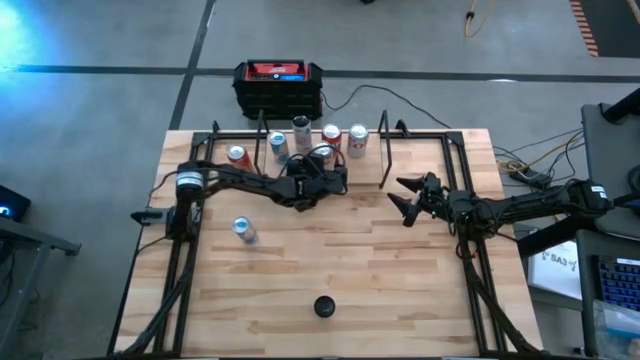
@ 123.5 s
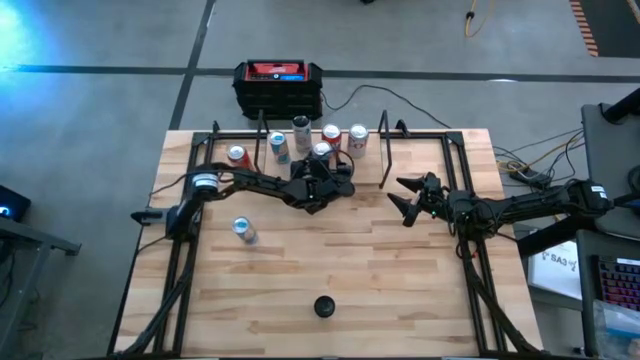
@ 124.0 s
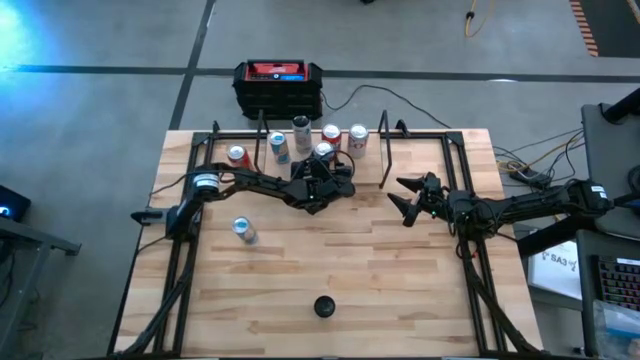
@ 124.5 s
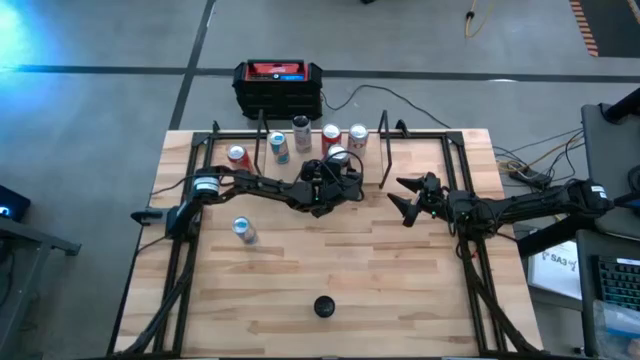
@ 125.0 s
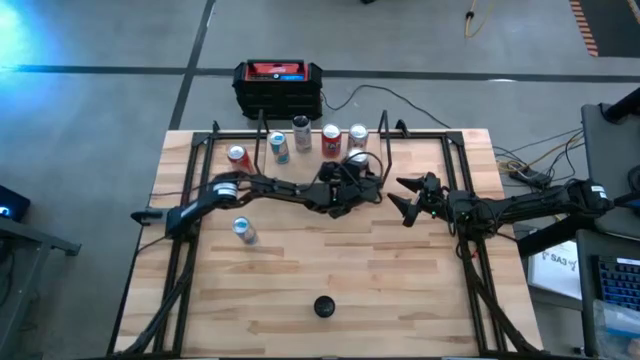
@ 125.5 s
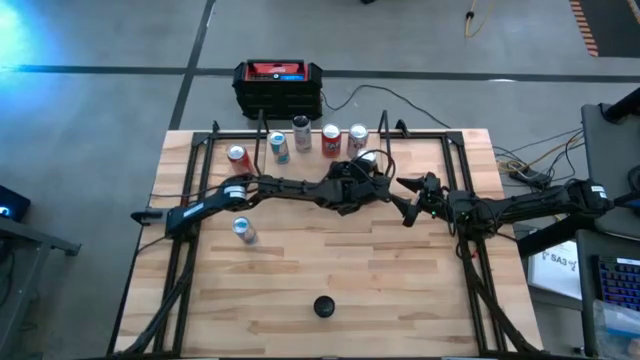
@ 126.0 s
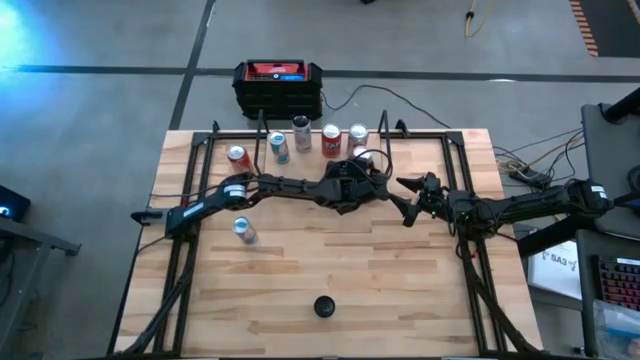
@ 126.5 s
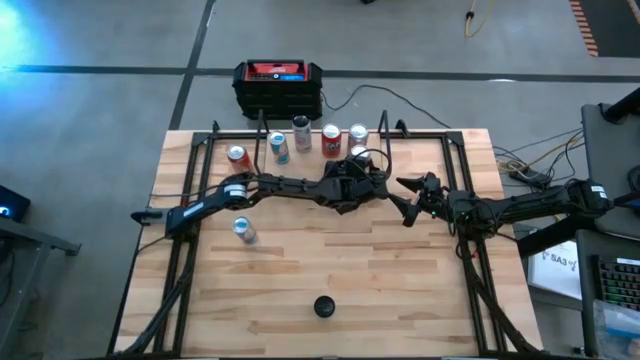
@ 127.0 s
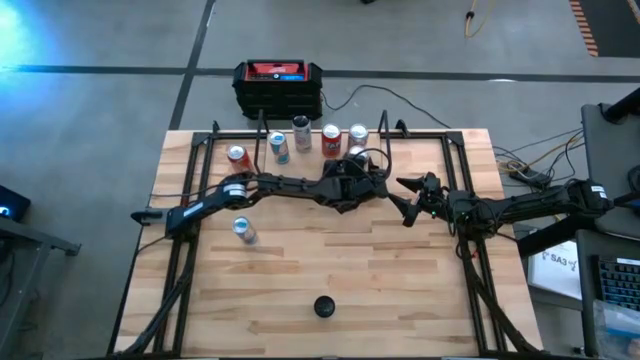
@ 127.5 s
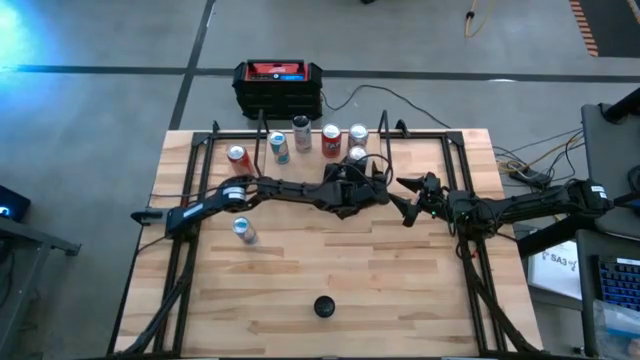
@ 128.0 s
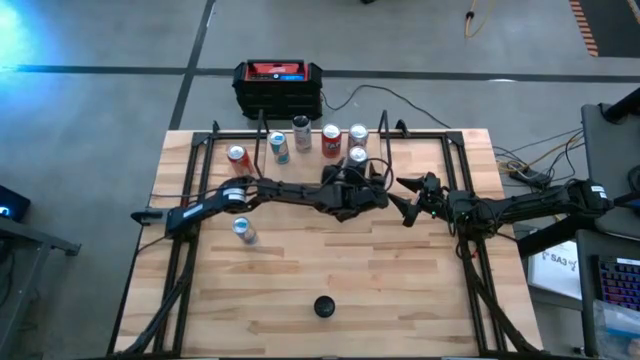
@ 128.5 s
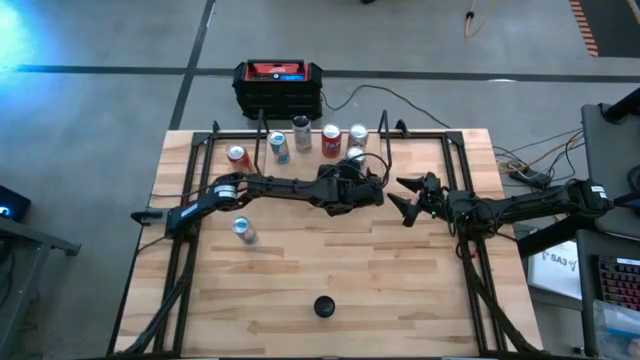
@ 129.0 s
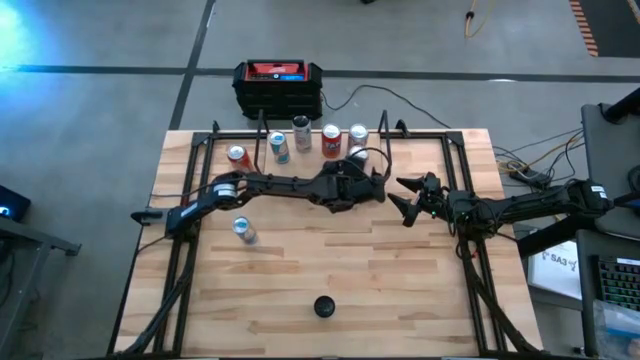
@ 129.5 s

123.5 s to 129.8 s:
Task: Place canned beverage on shelf
Put the red and silver soda can on the shelf aligned with the other red and silver soda can

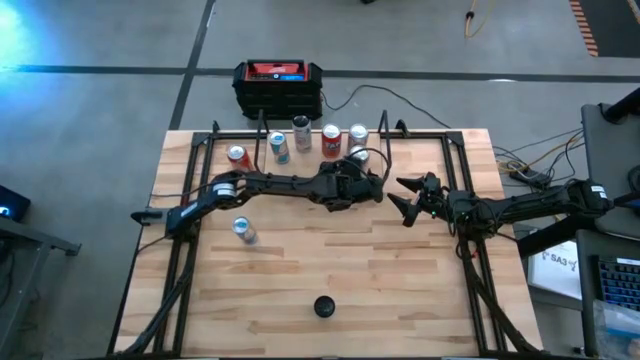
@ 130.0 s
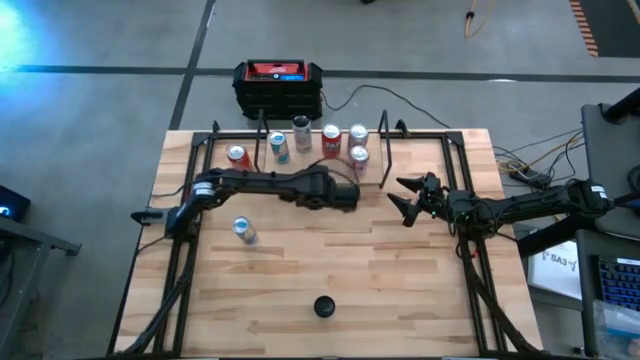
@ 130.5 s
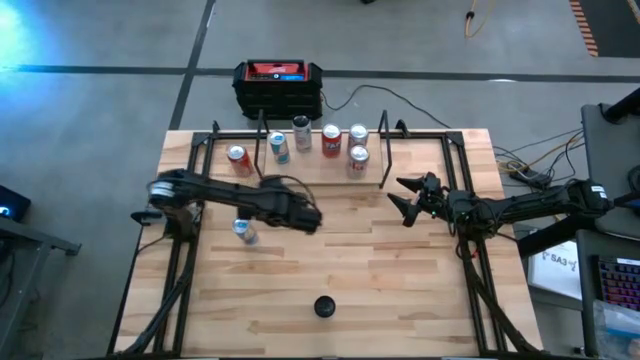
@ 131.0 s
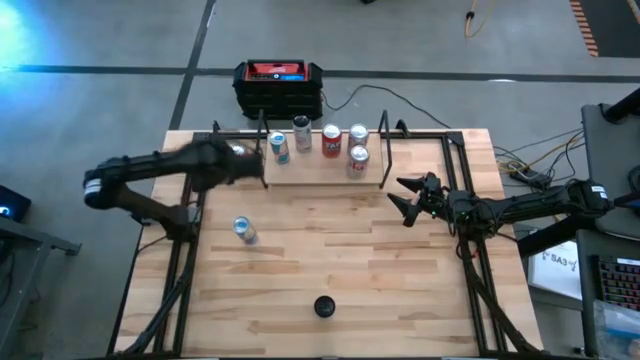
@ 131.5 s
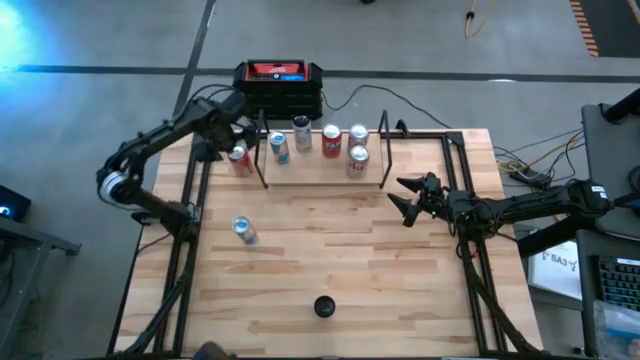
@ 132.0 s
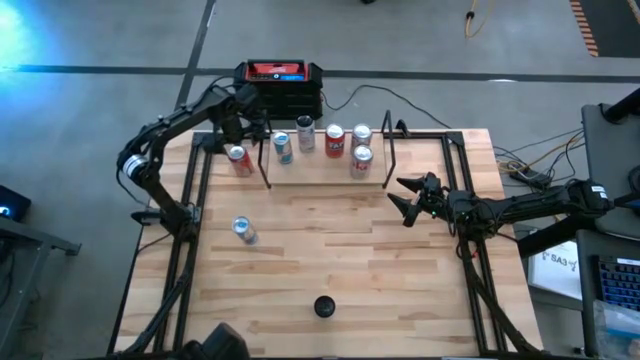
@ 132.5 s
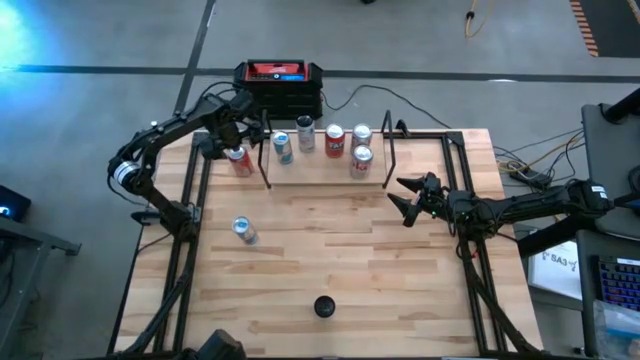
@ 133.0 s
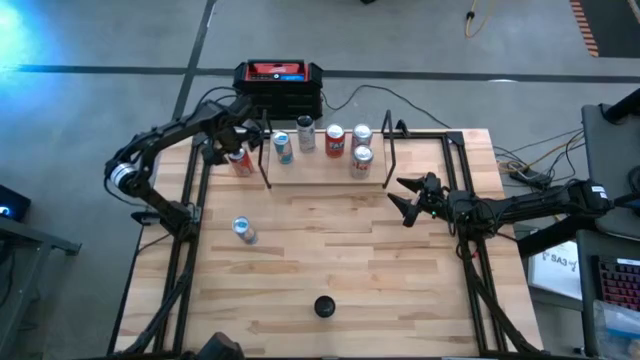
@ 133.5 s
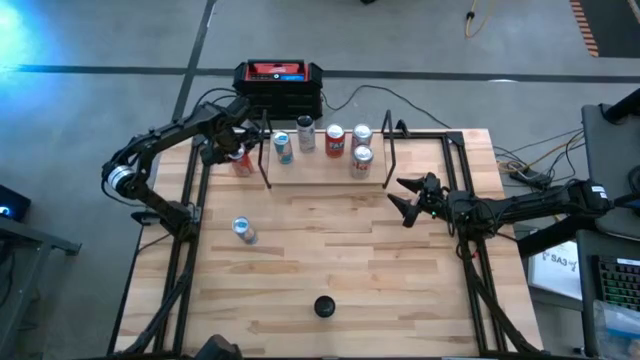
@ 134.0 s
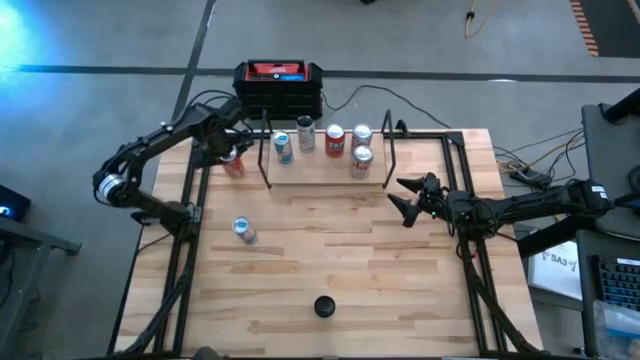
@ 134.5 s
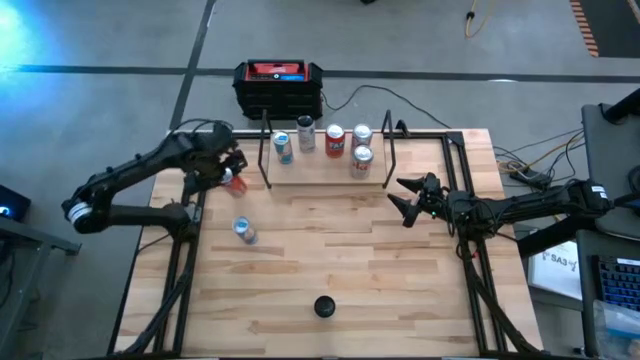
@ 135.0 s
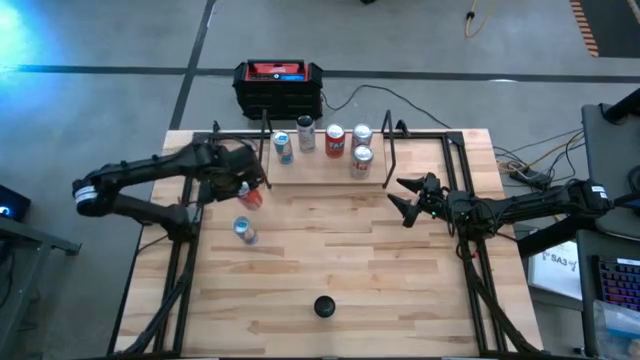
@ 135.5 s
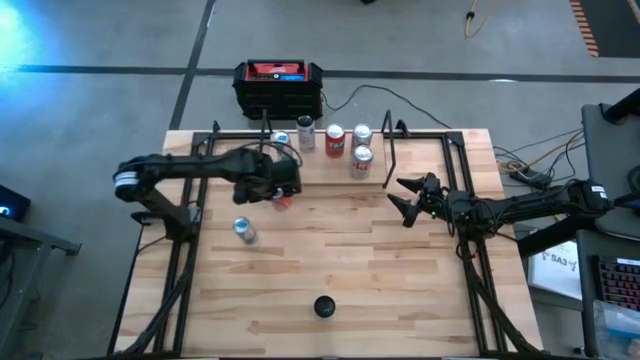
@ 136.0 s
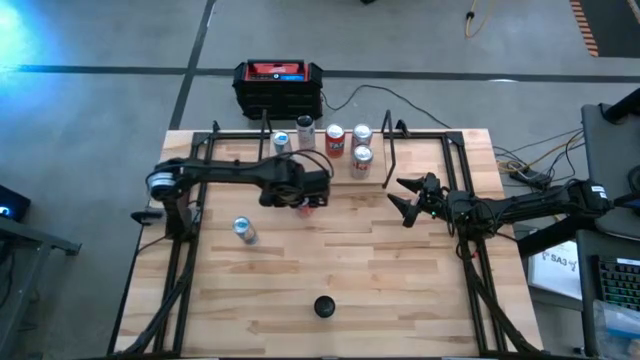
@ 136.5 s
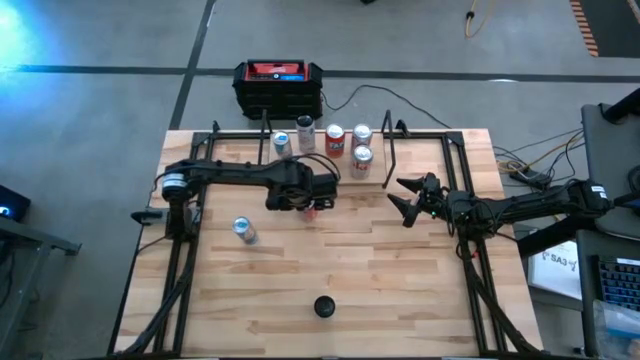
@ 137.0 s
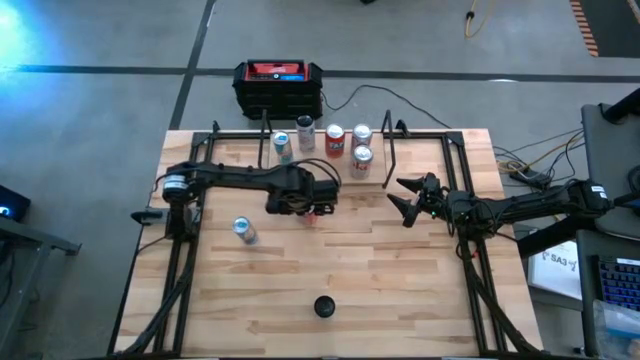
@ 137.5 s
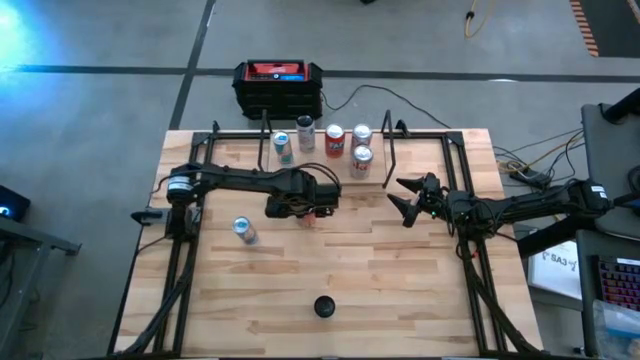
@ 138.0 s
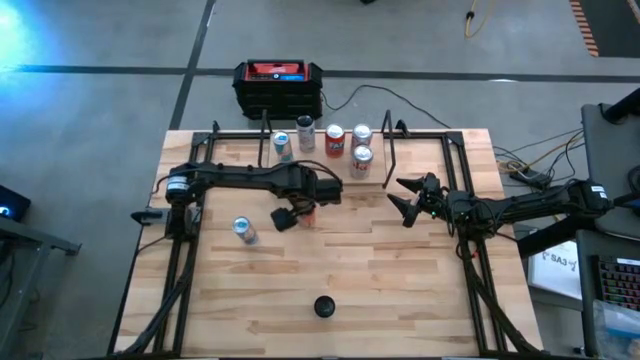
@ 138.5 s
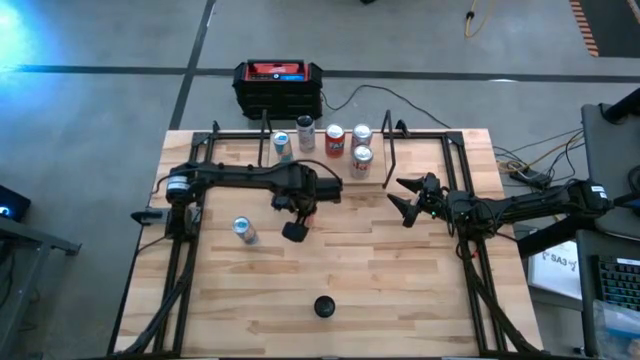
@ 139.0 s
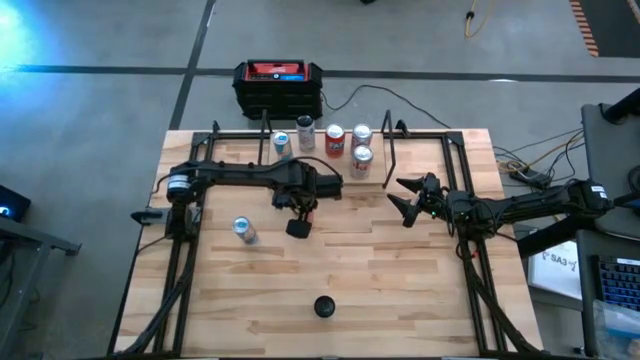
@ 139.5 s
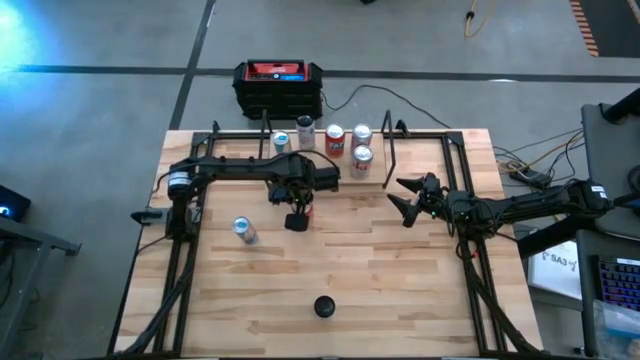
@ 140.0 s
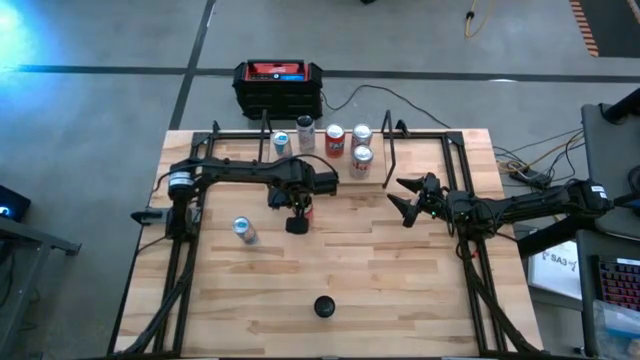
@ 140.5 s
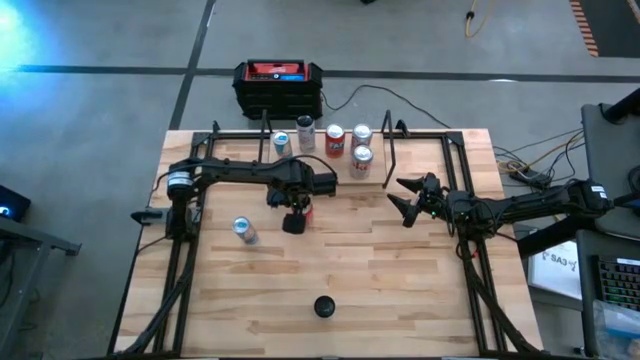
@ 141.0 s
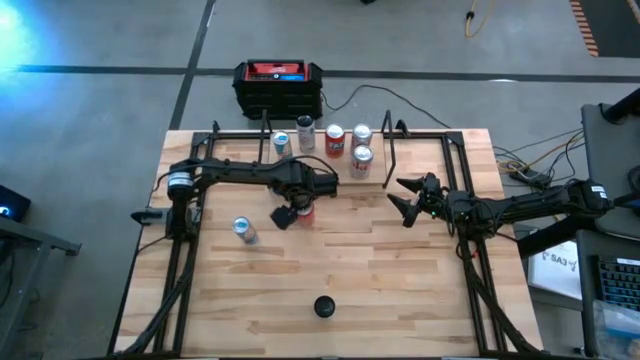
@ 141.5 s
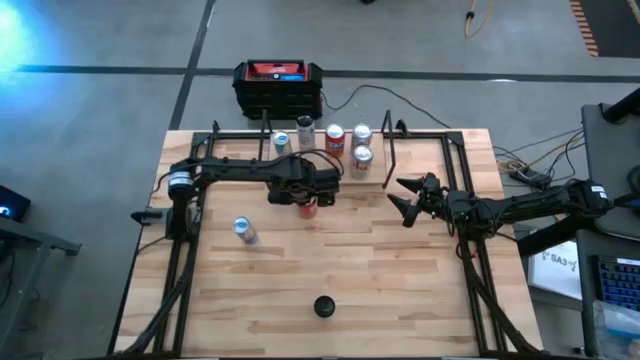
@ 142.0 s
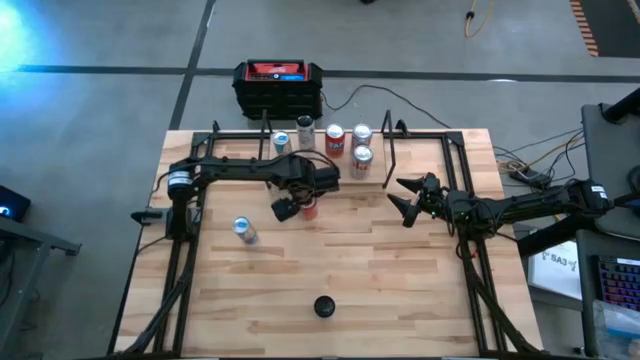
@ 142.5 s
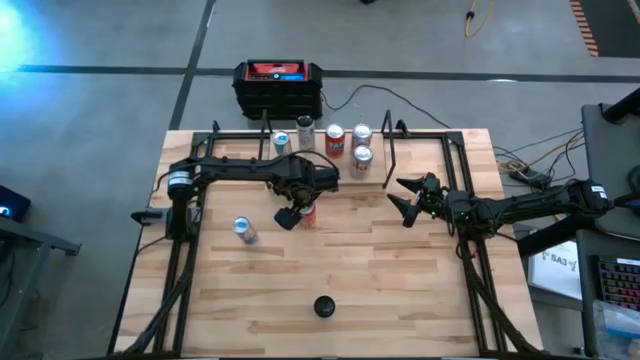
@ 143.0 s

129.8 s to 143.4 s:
Put the red soda can on the shelf aligned with the other red soda can
